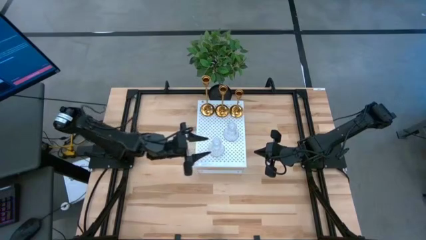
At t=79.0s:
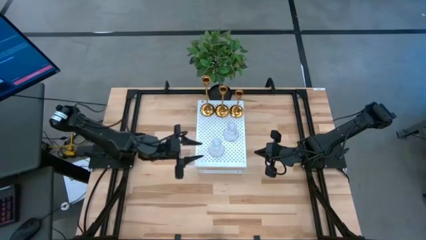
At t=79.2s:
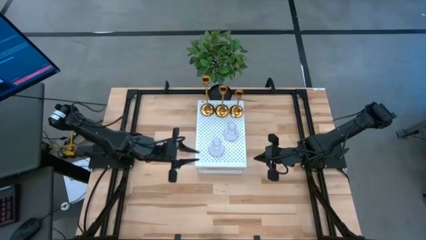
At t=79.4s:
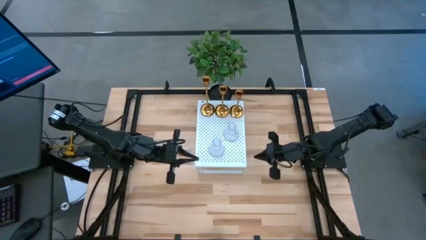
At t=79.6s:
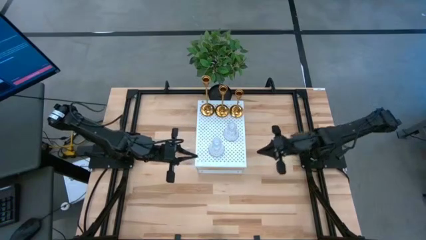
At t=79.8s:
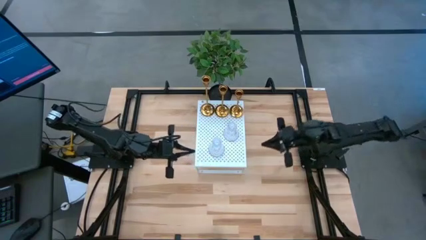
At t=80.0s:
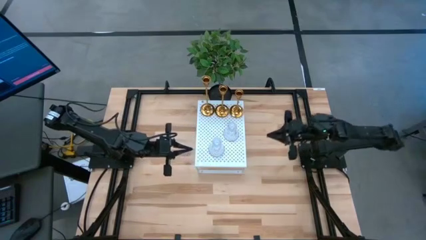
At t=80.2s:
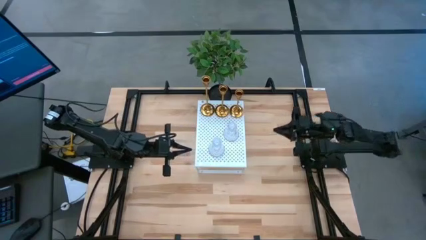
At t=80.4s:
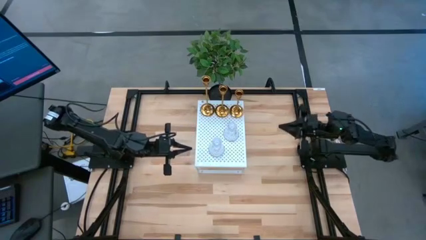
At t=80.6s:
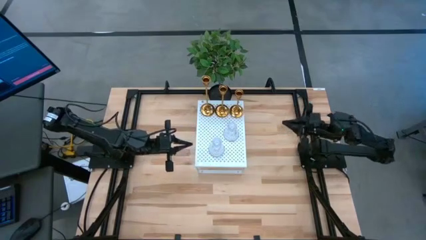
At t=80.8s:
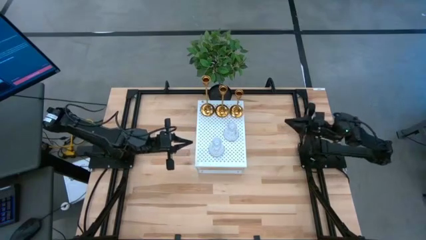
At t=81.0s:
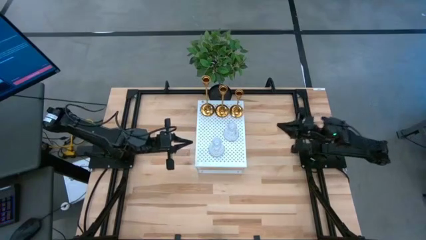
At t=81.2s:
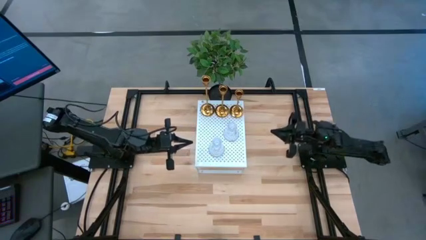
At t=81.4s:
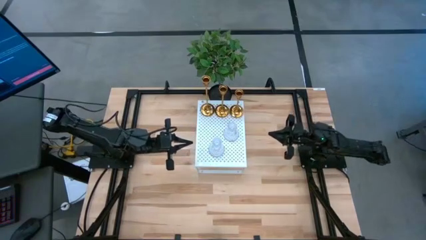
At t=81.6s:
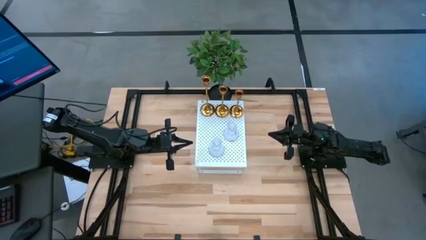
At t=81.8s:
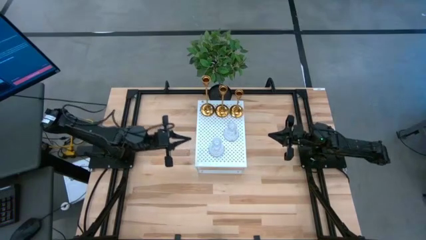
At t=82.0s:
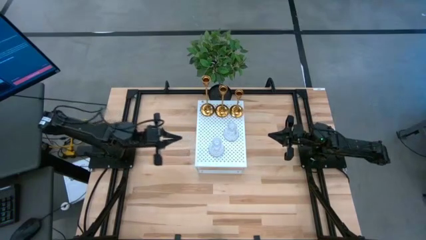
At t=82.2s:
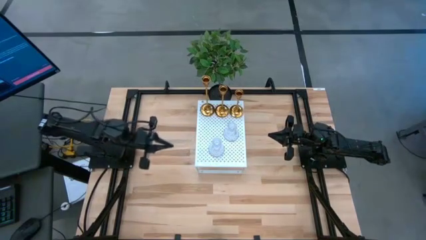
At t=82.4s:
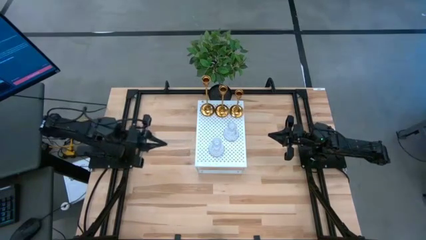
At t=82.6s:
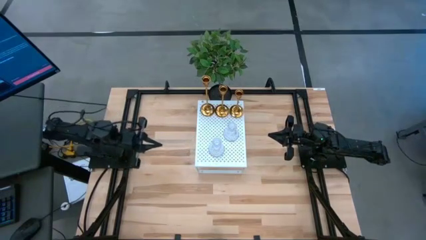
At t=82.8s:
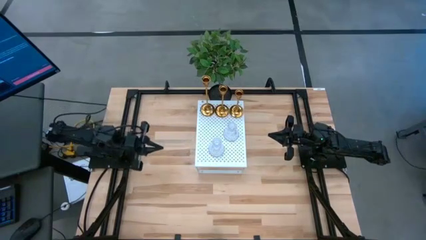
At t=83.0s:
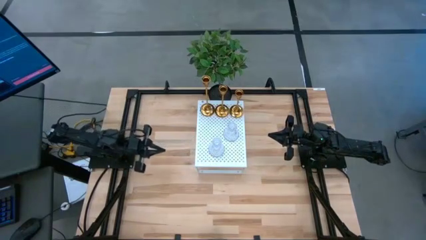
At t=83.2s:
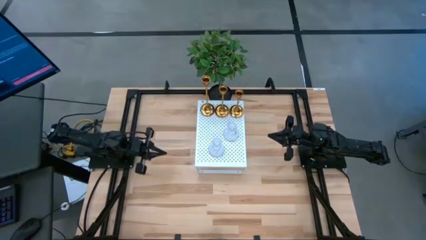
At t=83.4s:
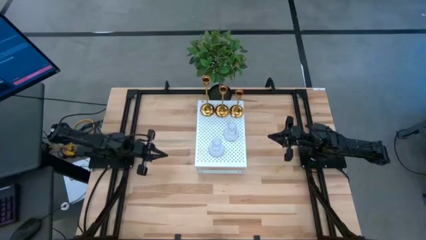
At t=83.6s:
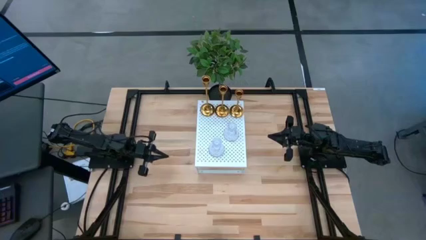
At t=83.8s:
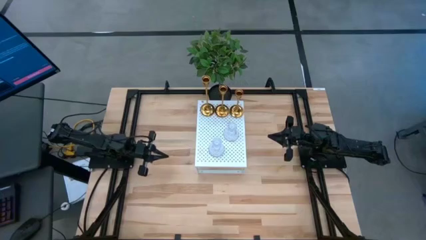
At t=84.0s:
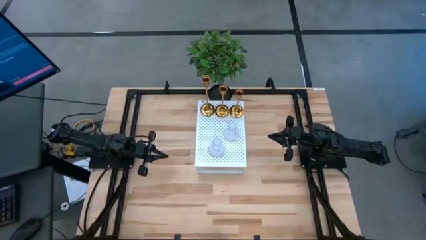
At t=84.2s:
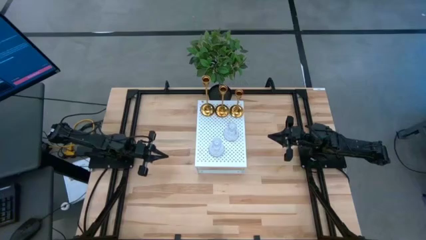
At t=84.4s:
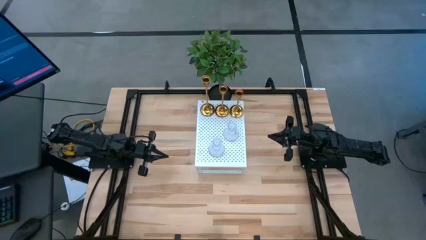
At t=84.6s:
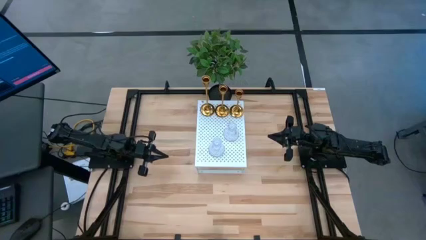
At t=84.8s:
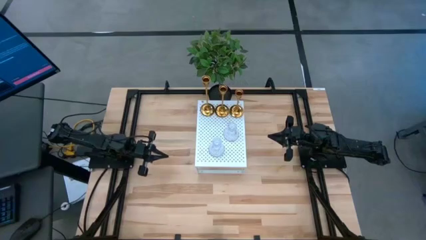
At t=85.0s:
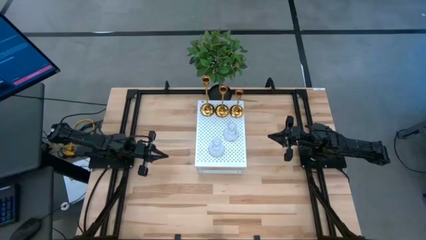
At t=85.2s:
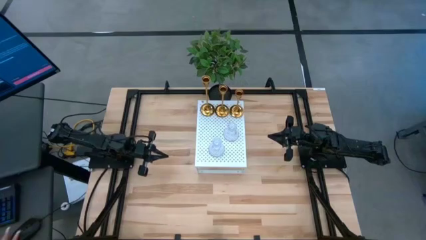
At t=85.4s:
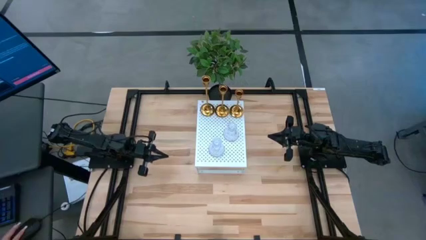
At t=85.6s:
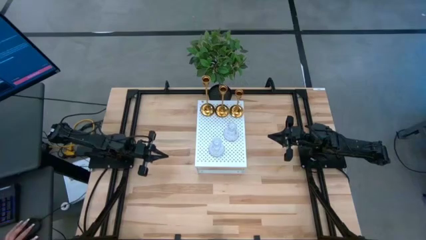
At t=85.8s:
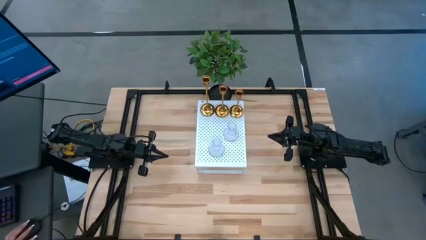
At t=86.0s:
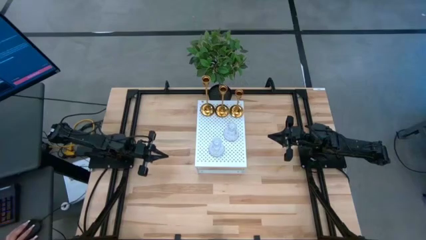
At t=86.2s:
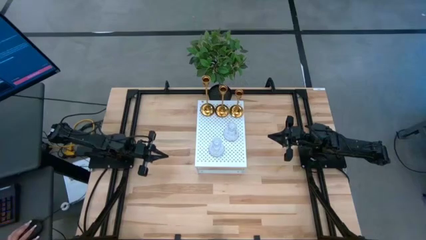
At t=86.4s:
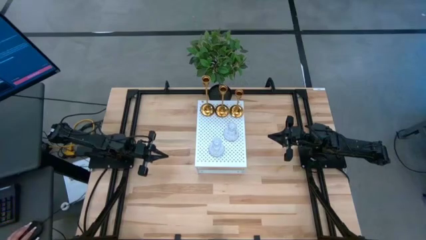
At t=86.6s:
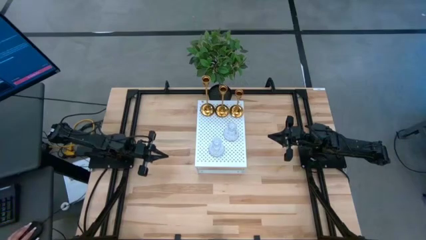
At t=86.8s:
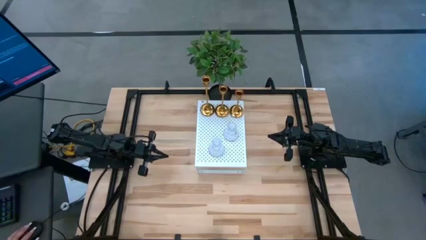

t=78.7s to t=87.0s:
Task: Pick & Place candle stick holders
Return to Home Position

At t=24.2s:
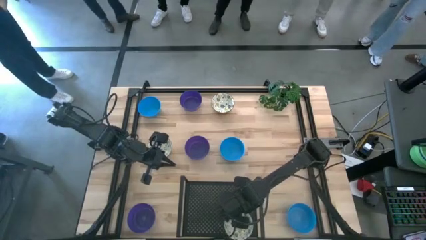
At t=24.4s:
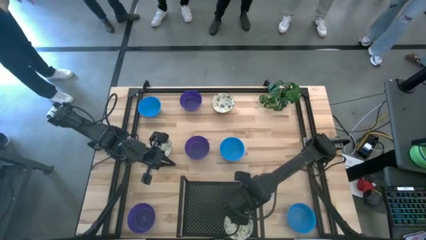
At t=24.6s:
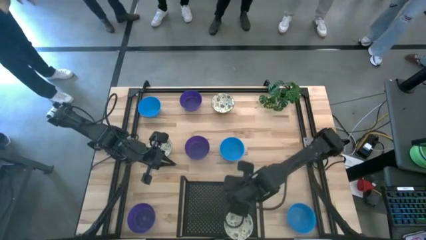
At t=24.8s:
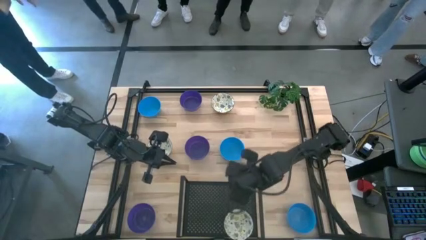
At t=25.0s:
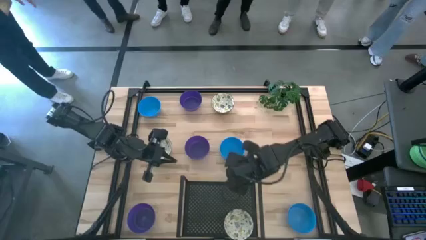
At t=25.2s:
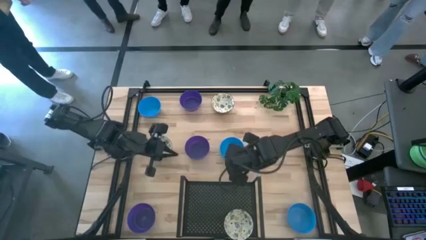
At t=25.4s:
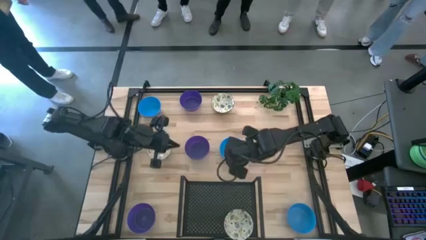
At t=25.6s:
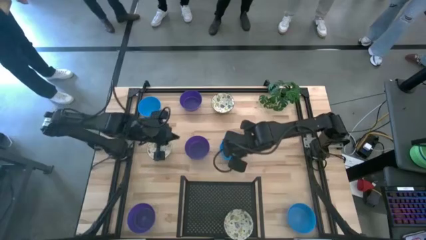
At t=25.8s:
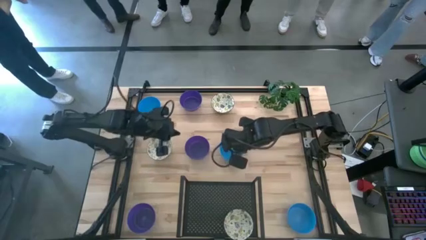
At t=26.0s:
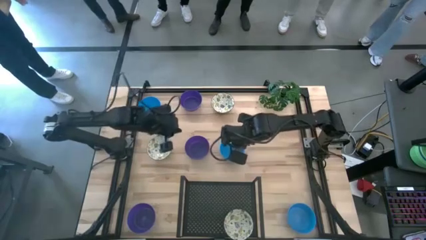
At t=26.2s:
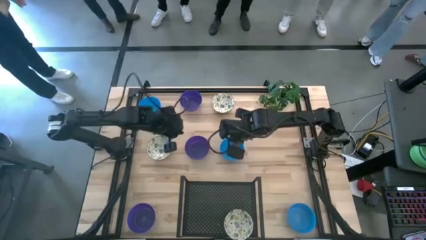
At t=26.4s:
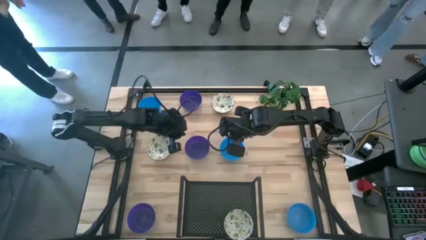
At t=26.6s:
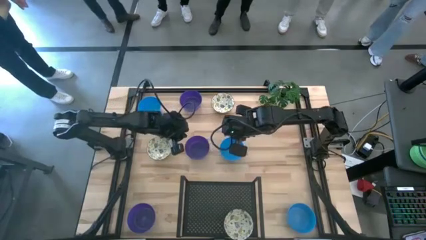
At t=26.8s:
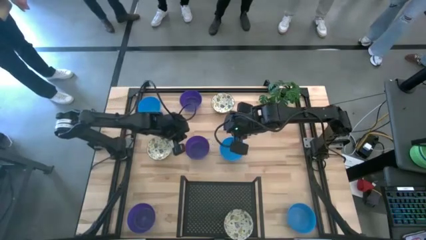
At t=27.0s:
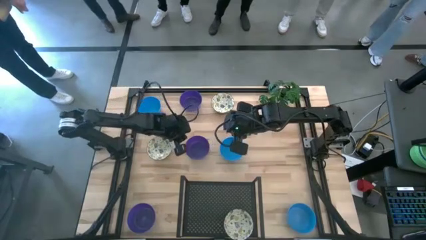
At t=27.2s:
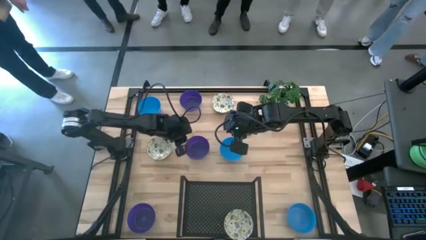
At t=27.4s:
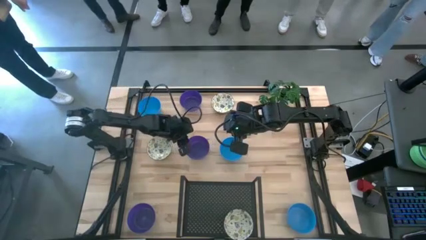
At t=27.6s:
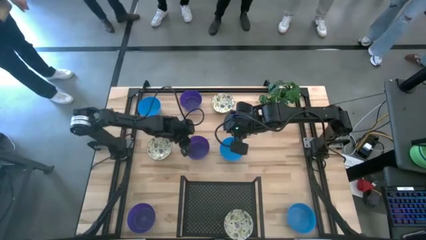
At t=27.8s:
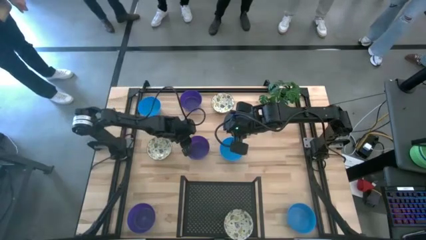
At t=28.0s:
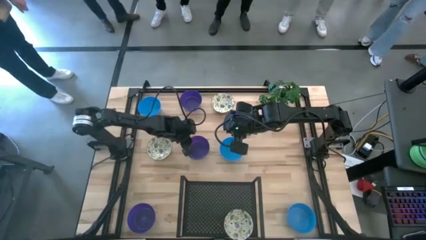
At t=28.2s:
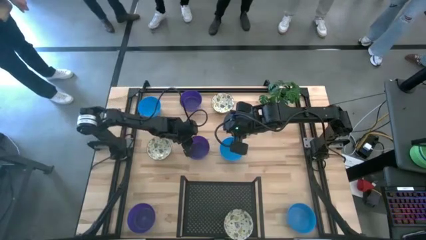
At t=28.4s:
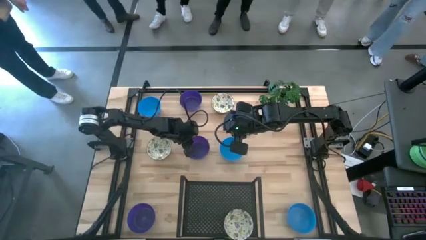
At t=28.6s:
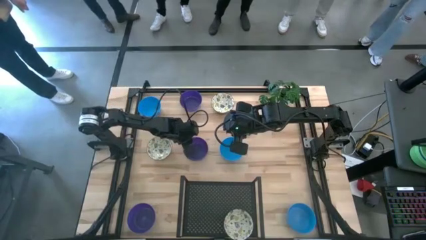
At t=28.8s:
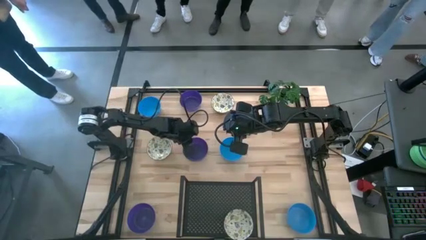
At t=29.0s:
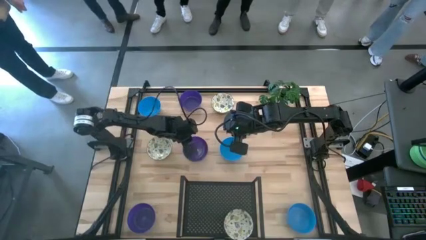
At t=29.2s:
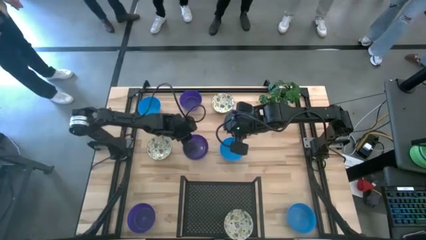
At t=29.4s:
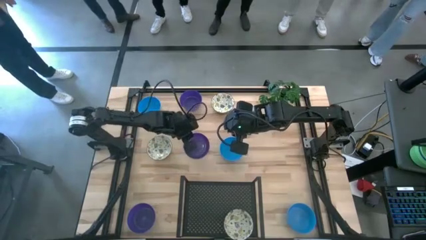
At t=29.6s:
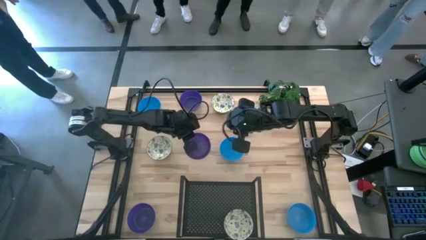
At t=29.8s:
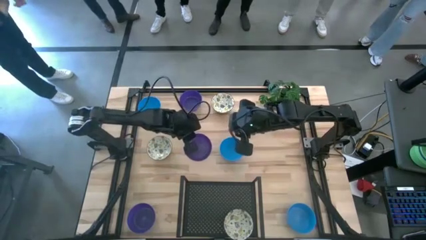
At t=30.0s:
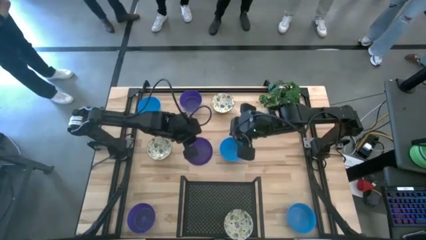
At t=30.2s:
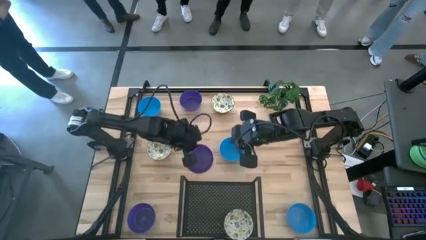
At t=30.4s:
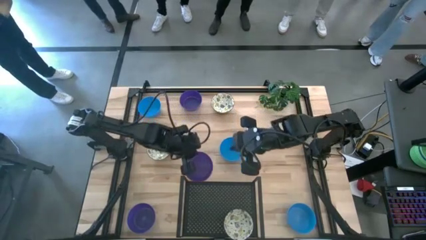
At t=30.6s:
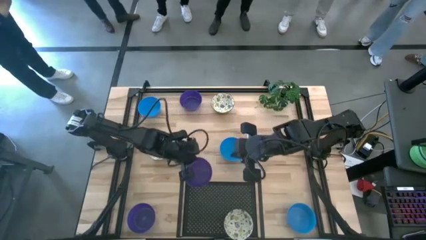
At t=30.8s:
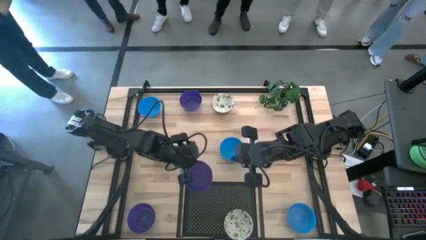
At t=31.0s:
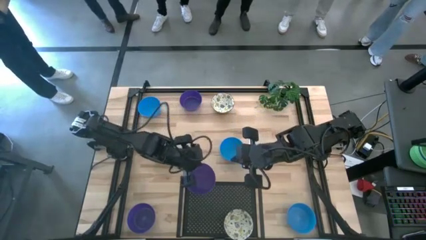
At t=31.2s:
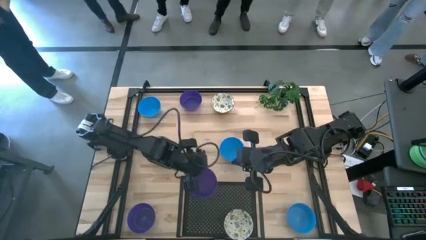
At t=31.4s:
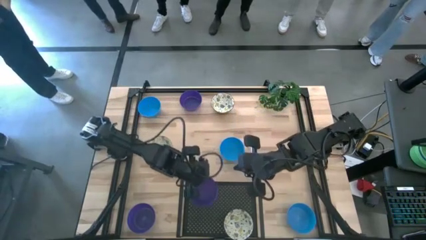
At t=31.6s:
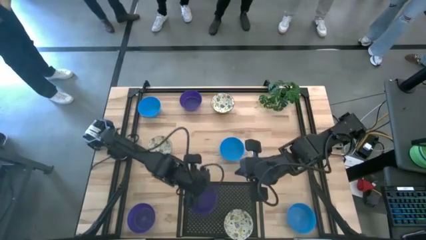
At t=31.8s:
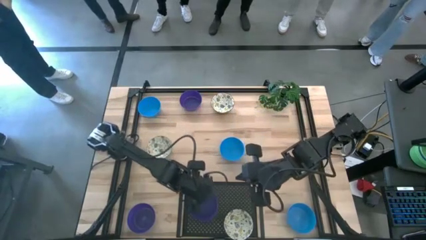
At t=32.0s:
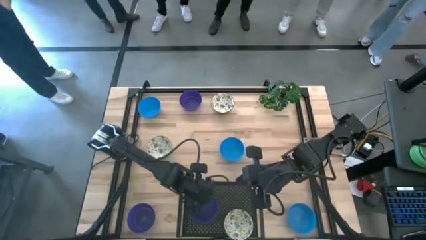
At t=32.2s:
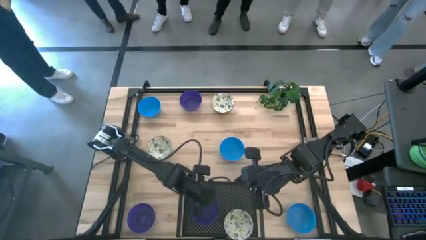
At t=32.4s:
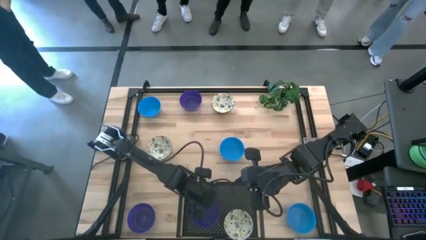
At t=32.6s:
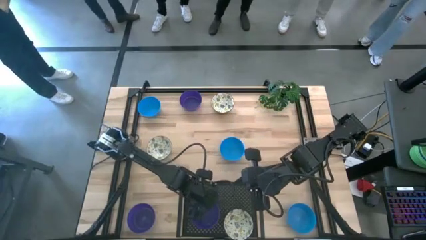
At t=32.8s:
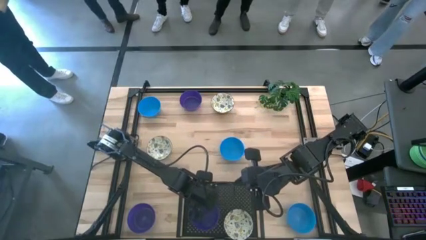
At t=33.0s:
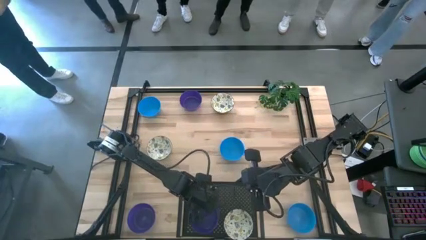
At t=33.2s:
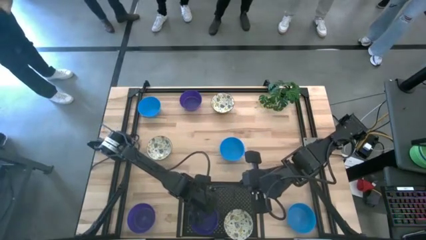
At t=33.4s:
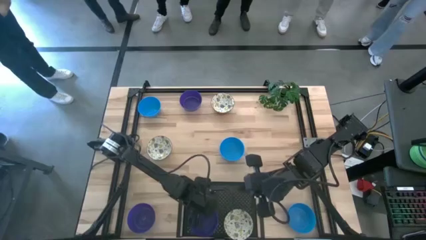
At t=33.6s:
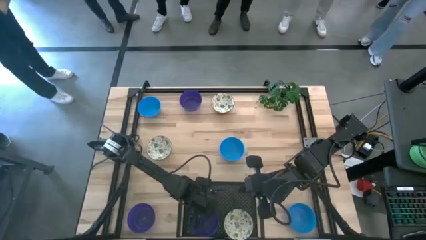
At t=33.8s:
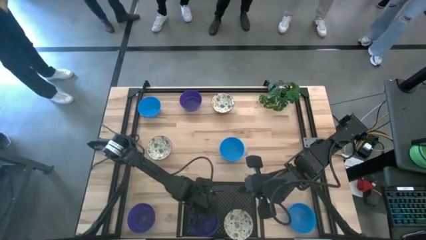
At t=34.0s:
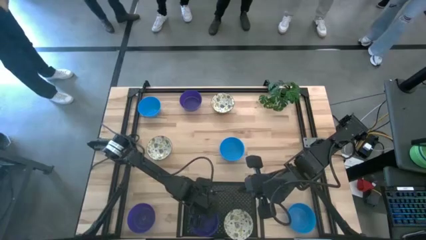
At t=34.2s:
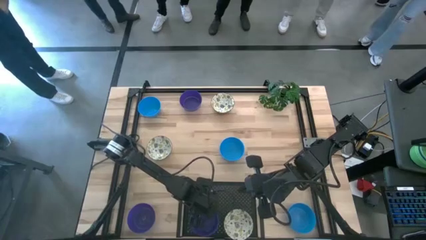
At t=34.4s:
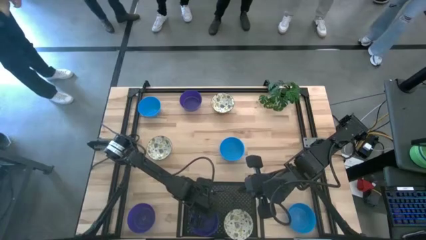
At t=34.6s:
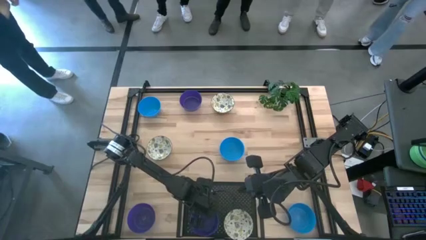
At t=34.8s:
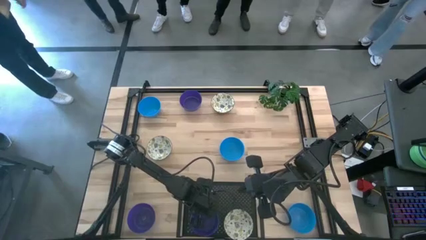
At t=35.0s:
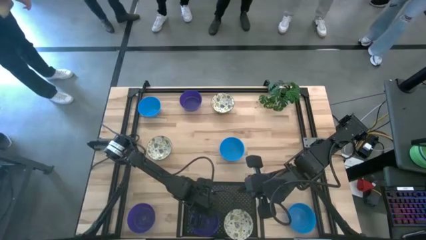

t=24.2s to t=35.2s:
Task: Pick & Place Mini bowls
Put the middle violet bowl on the shelf
